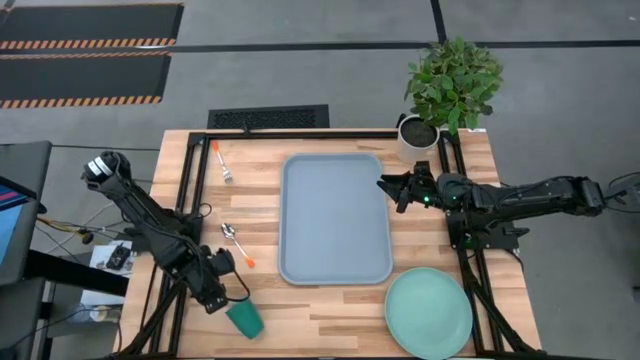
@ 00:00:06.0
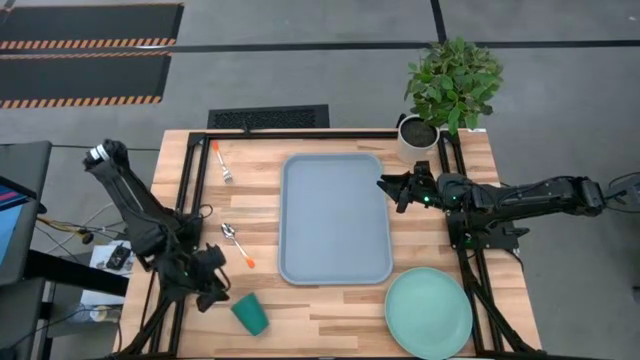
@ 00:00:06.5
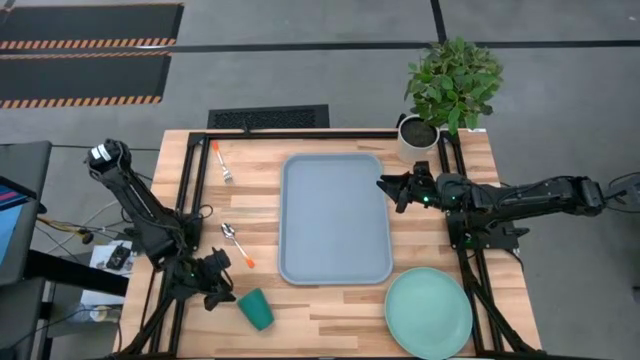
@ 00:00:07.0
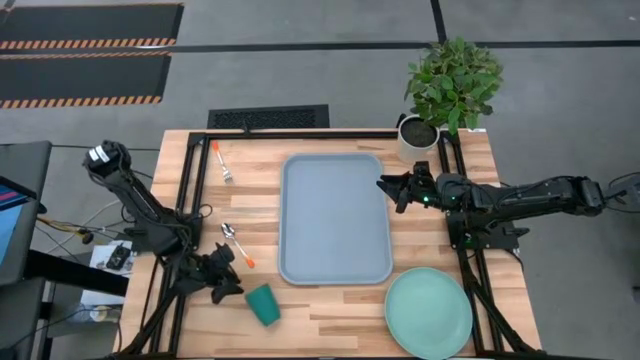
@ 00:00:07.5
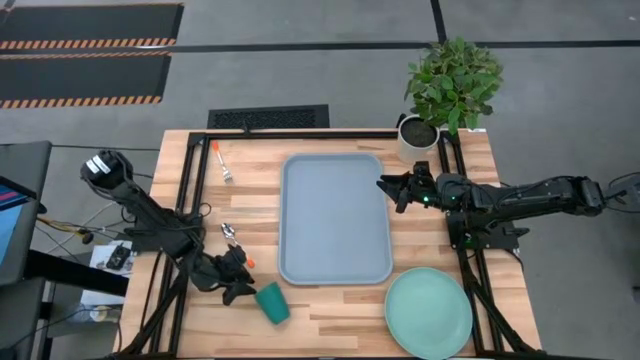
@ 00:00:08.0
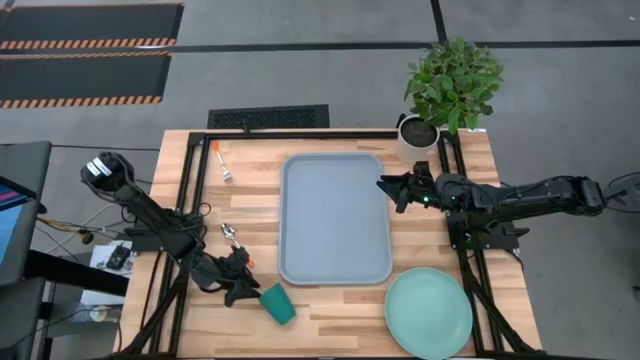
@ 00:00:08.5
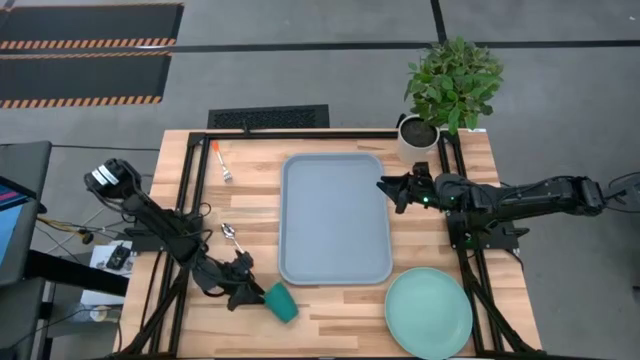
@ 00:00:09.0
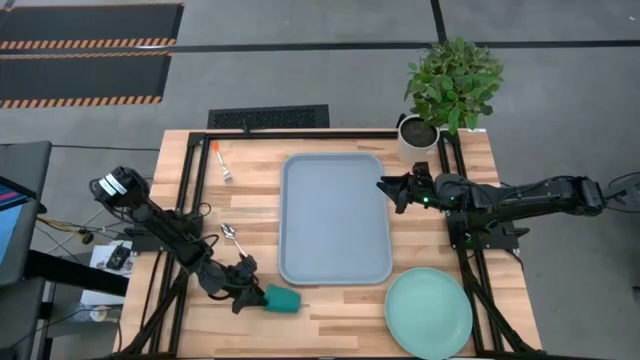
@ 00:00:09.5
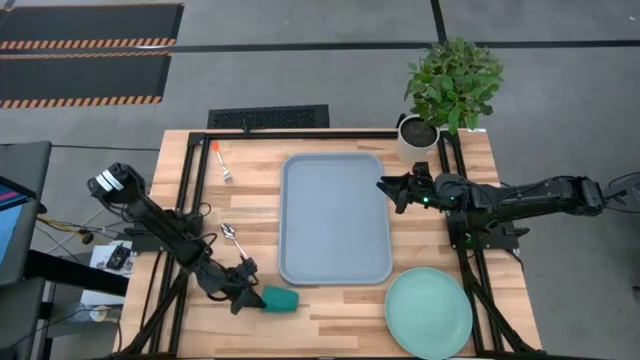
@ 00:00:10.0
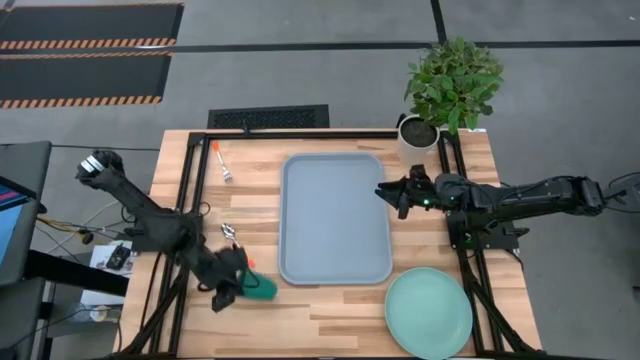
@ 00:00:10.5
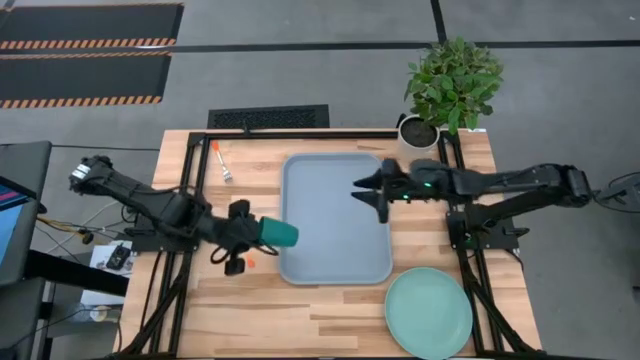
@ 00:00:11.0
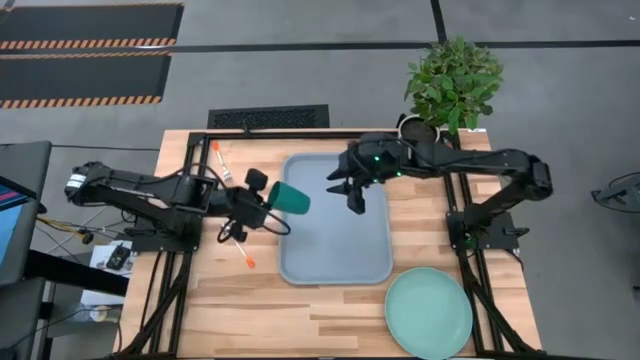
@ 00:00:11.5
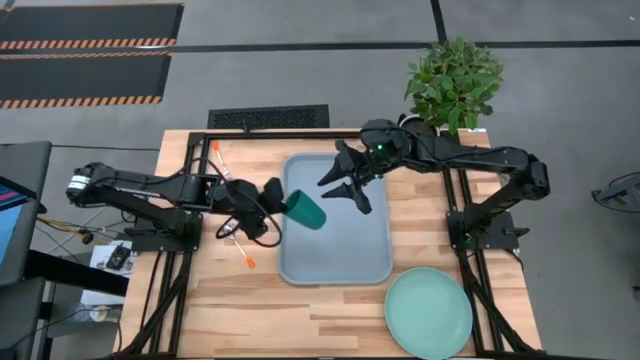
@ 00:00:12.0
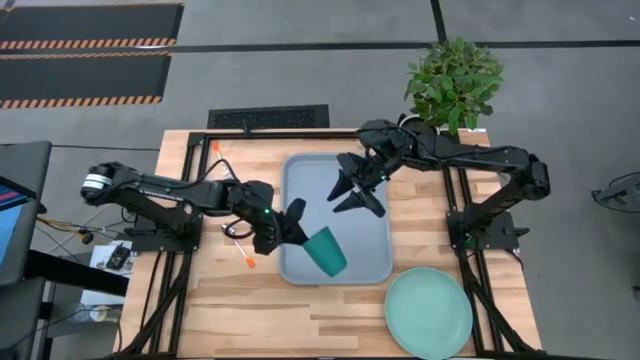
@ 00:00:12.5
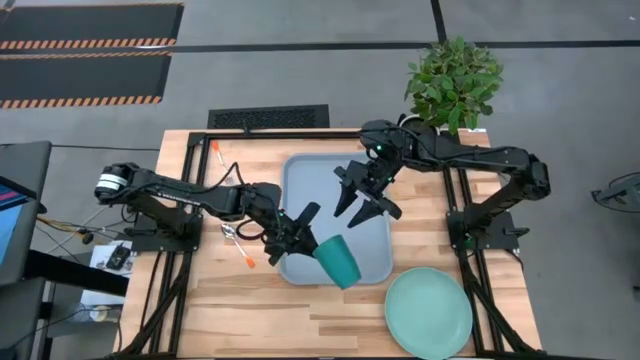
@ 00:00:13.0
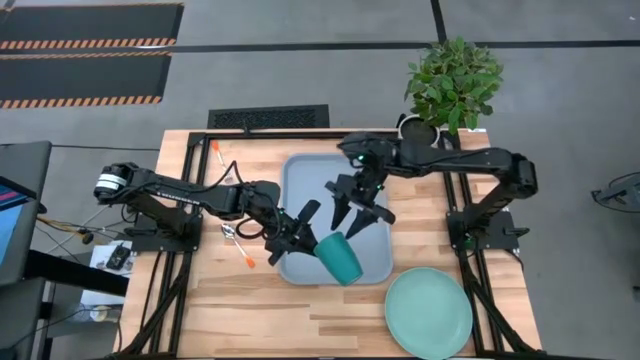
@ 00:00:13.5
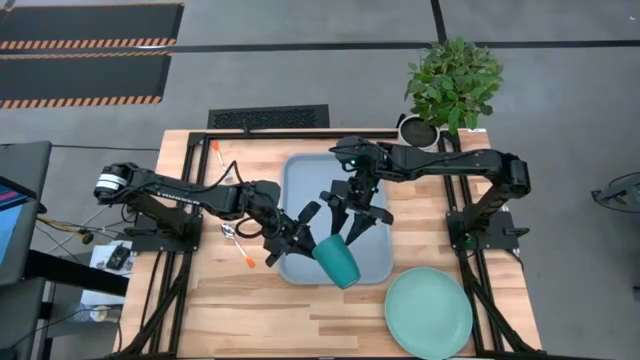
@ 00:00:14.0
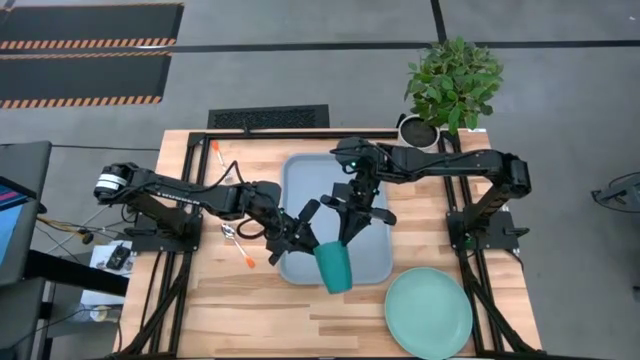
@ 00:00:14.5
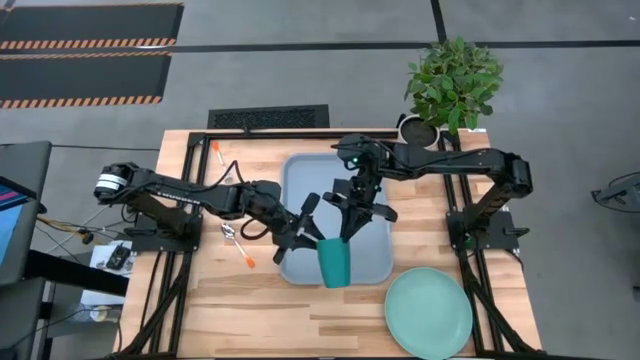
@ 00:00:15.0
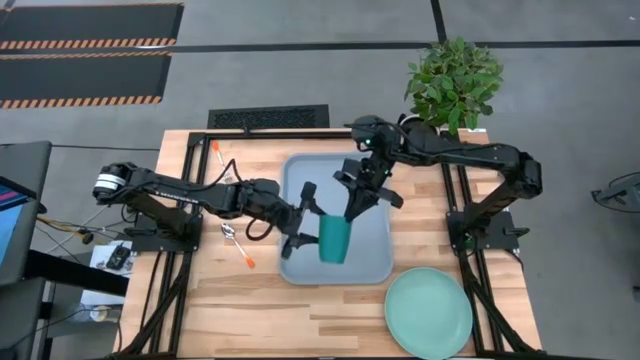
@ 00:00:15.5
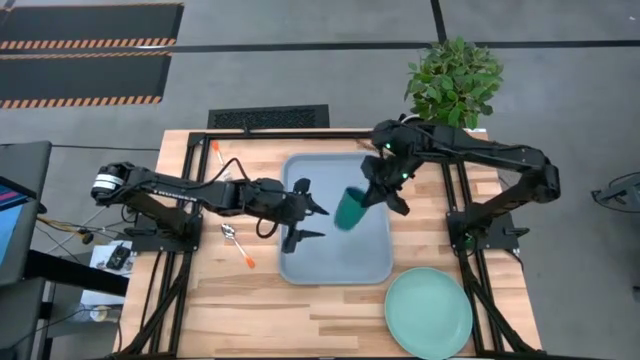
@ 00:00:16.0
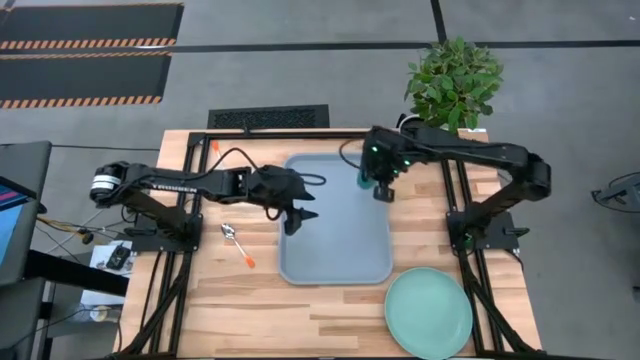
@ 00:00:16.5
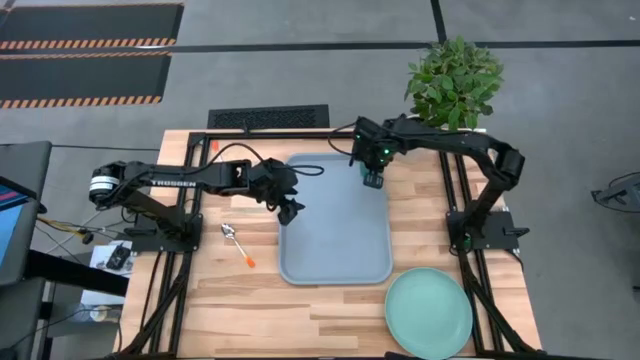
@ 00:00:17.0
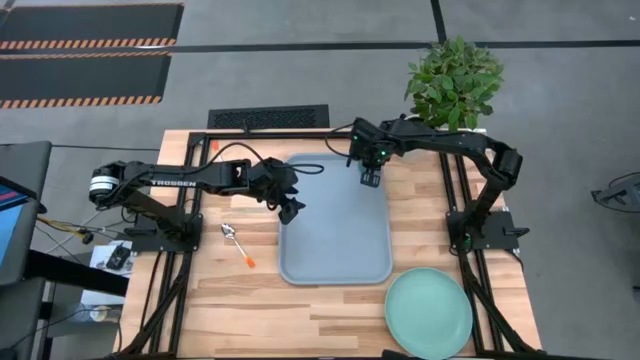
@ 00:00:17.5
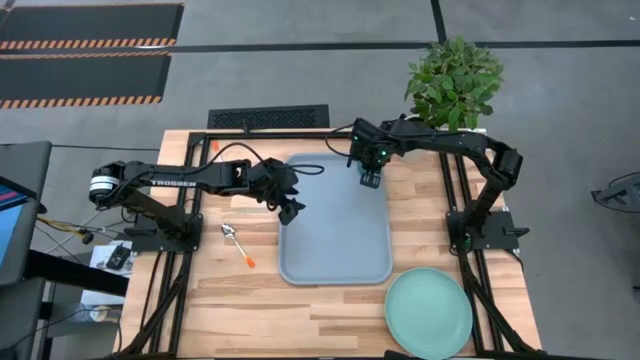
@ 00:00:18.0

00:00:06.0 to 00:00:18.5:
Task: Pick and place plate/cup/fork/spoon on tray
Put the green cup on the top right of the gray serving tray

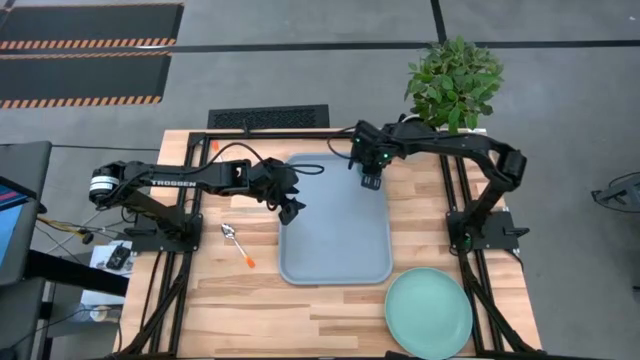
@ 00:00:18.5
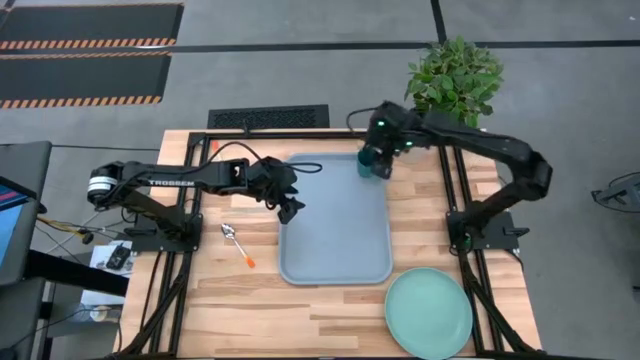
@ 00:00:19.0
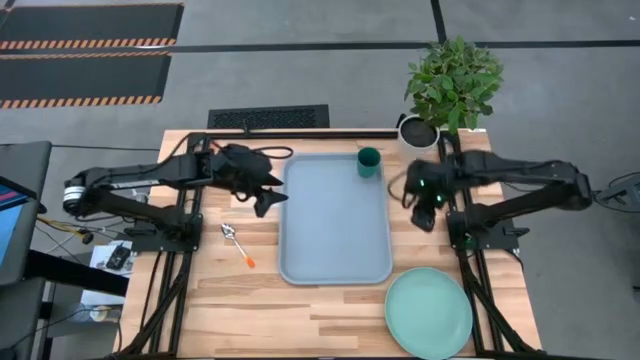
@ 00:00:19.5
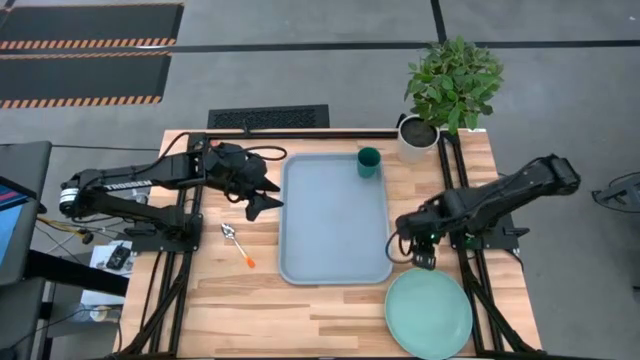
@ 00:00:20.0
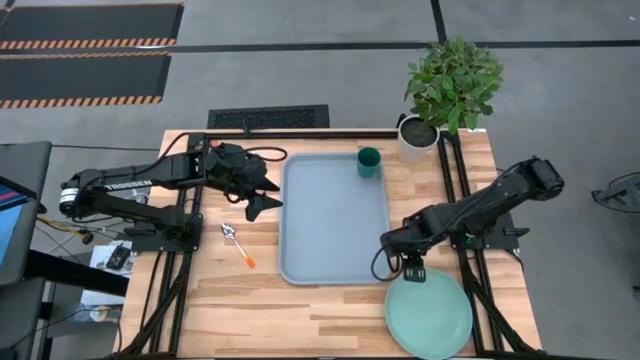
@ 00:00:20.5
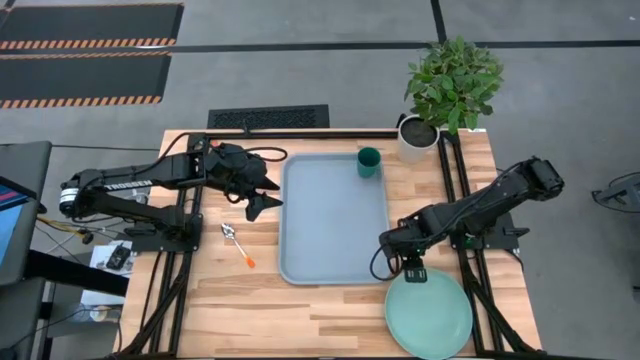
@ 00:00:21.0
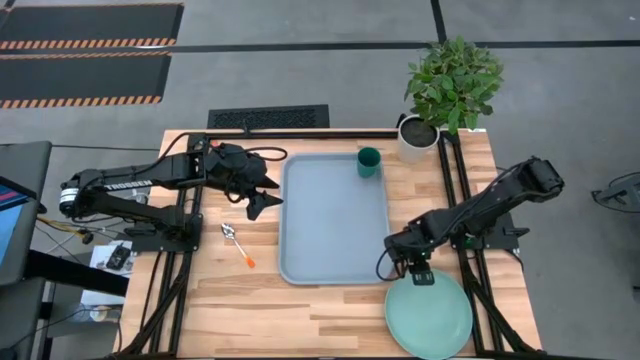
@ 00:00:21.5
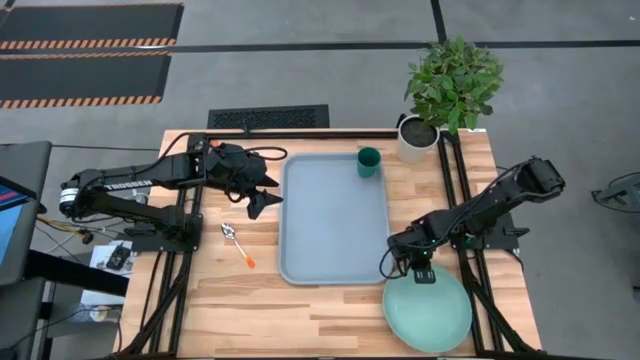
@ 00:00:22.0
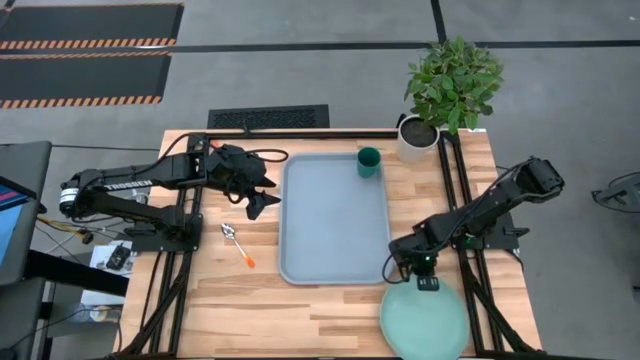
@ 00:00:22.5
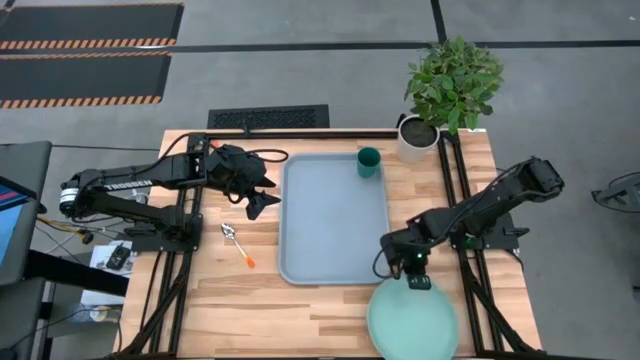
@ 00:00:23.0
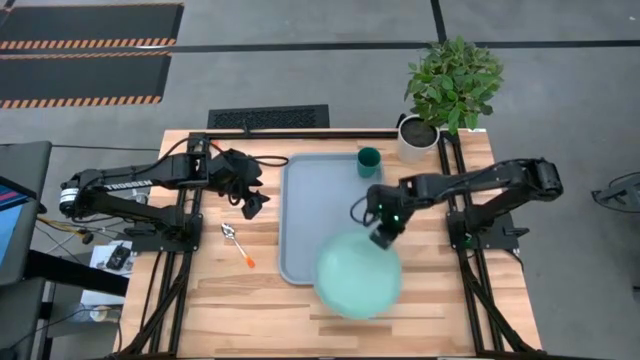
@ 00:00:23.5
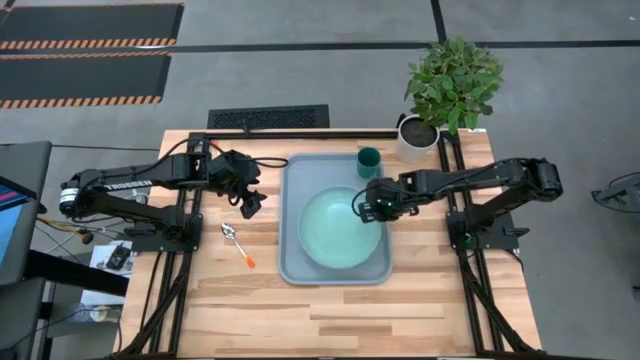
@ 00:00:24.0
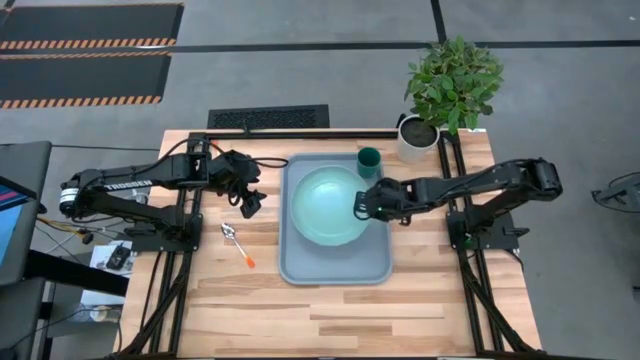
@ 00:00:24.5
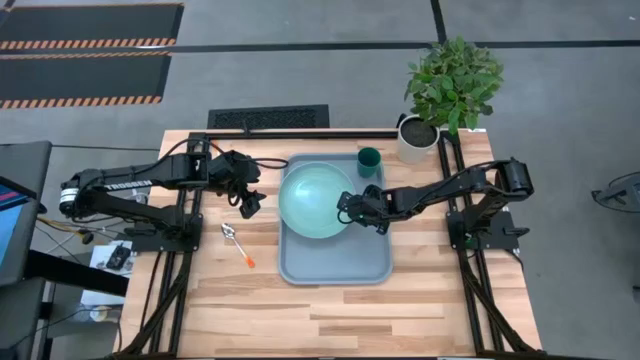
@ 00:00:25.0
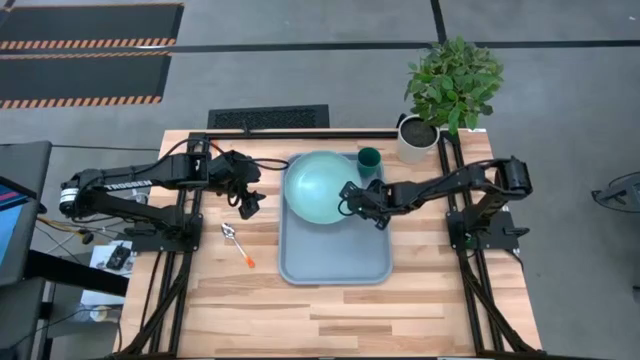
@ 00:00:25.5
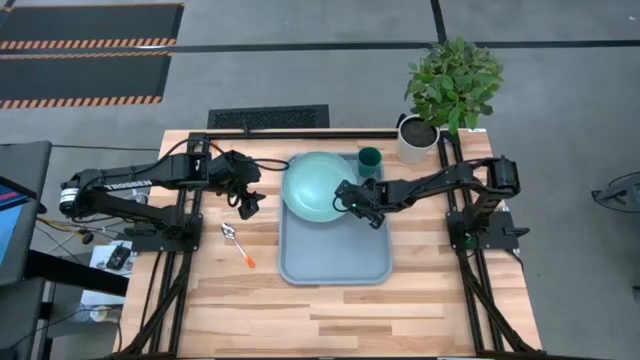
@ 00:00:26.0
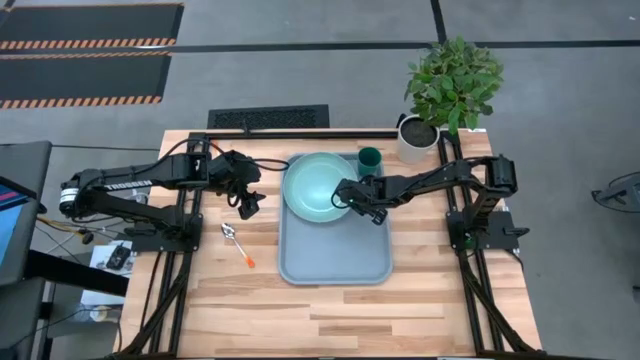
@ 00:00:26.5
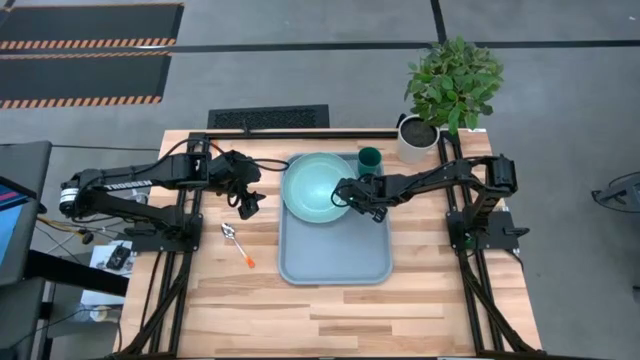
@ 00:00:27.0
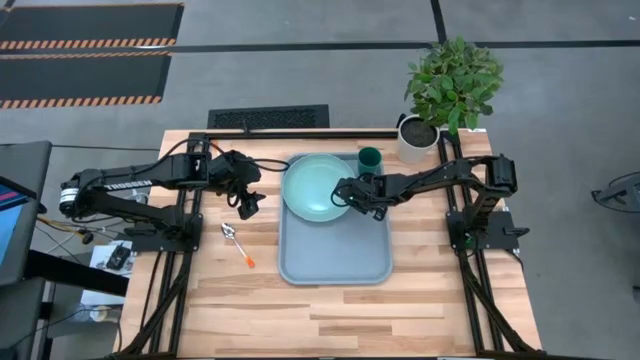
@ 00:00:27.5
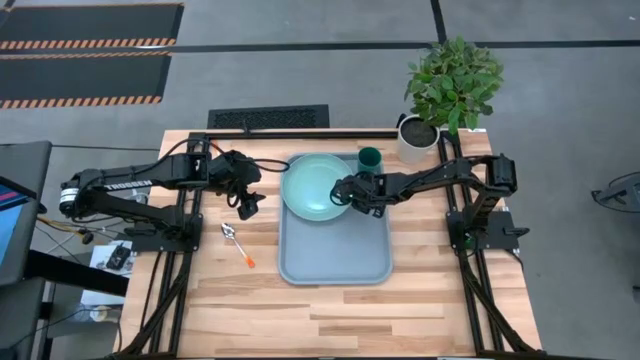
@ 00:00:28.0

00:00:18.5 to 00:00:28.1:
Put the light green plate on the gray serving tray to the bottom left of the green cup
